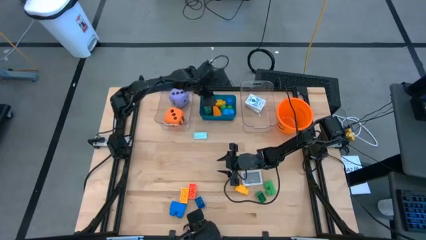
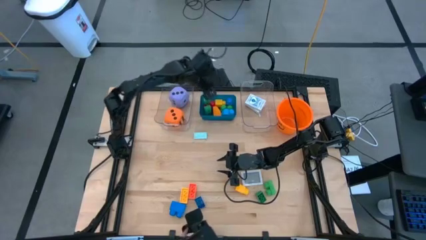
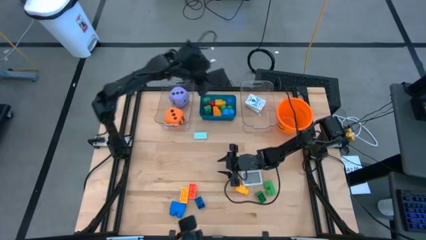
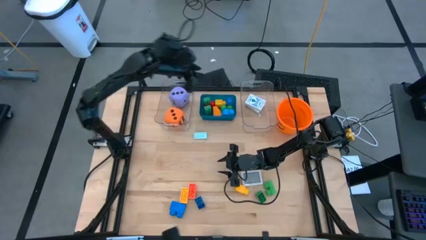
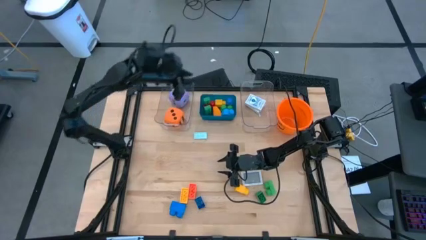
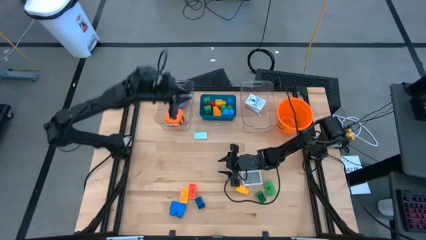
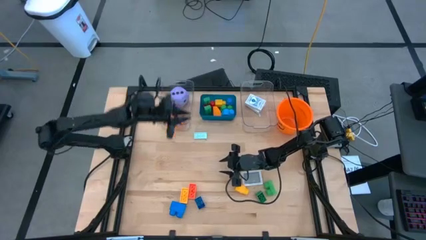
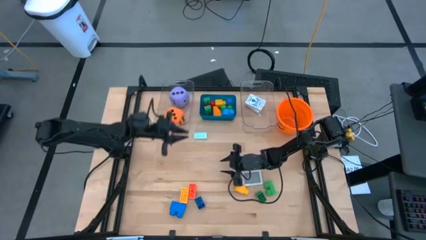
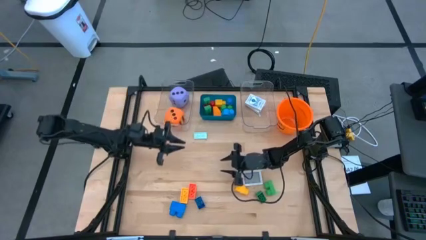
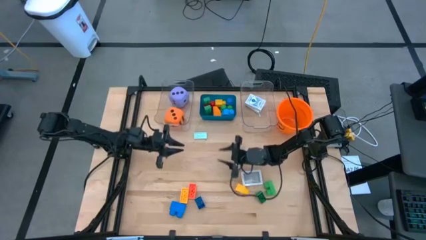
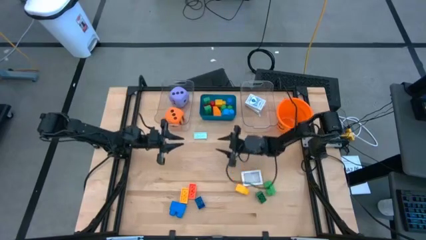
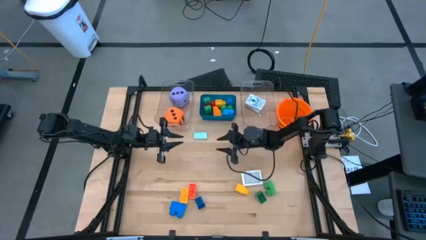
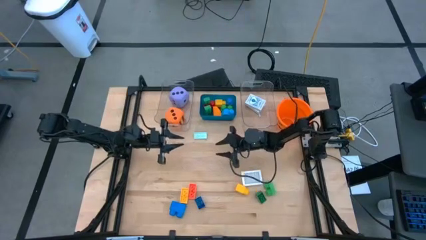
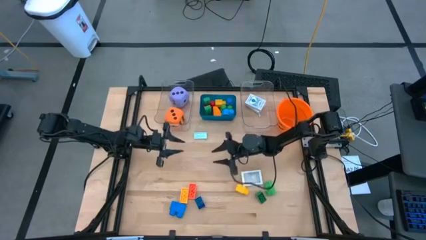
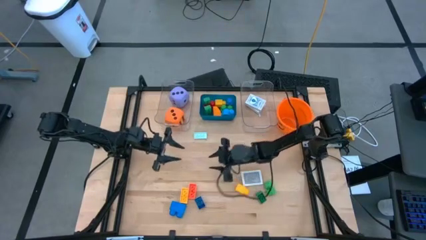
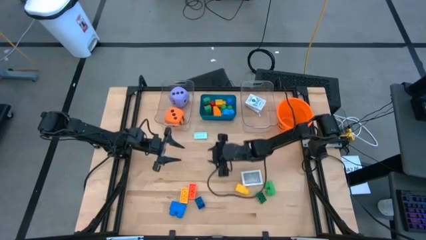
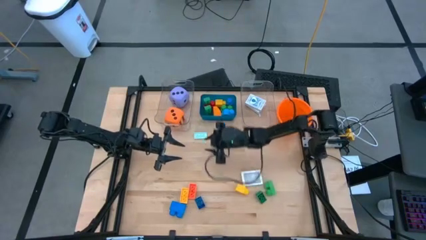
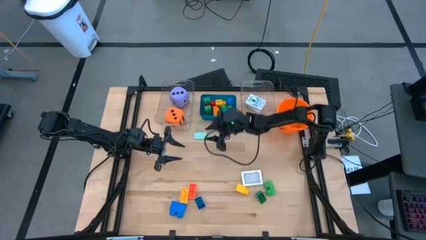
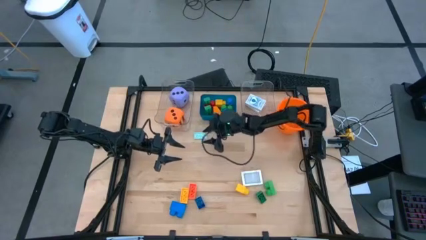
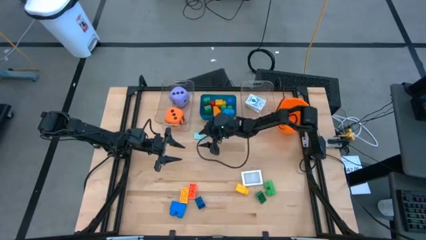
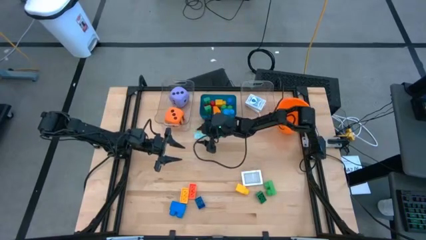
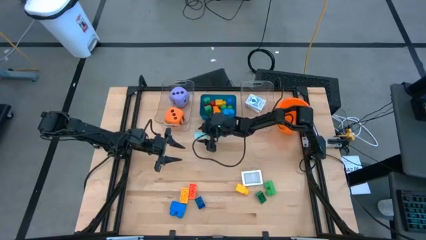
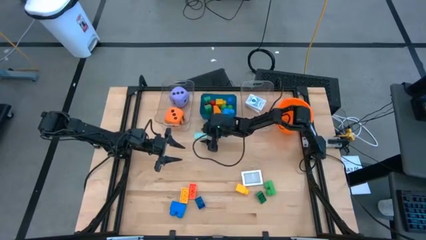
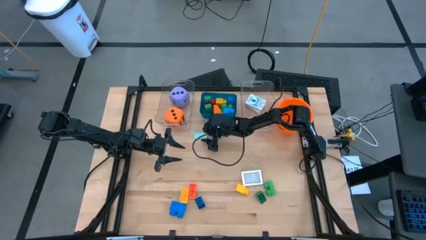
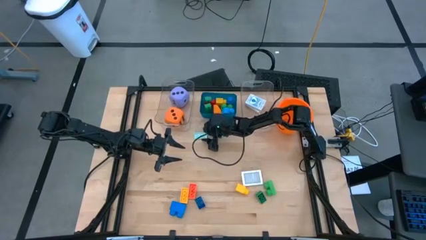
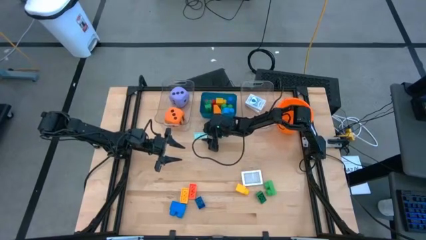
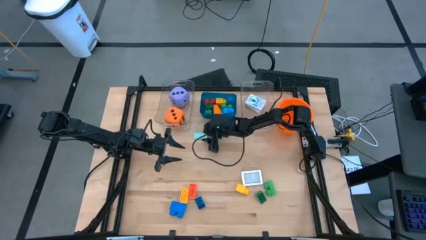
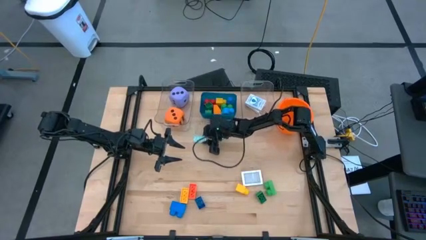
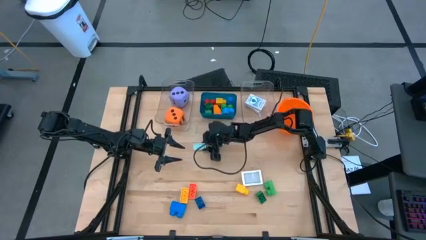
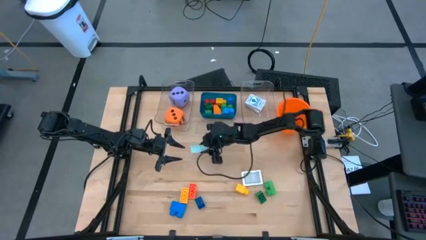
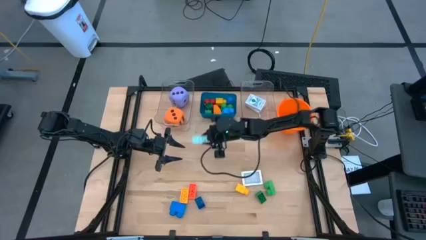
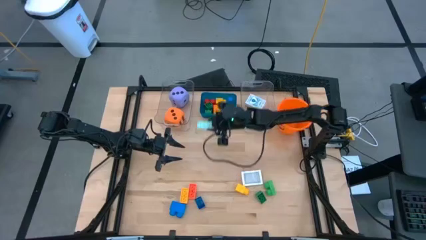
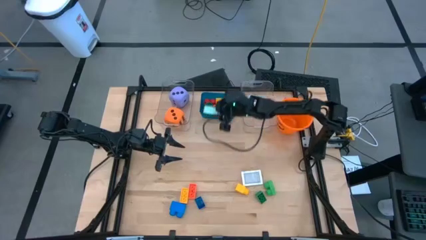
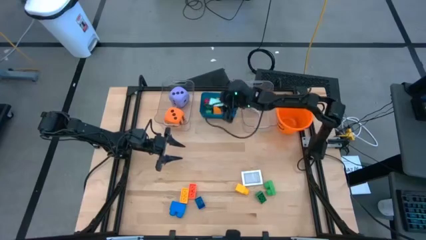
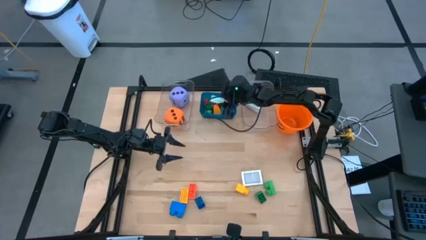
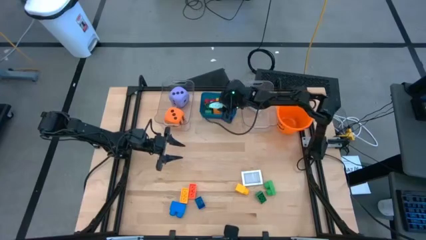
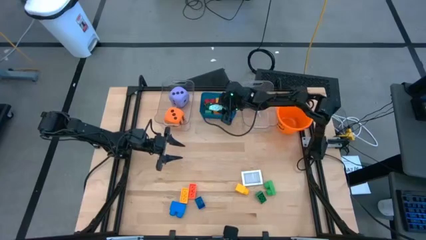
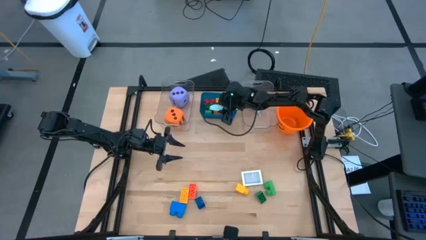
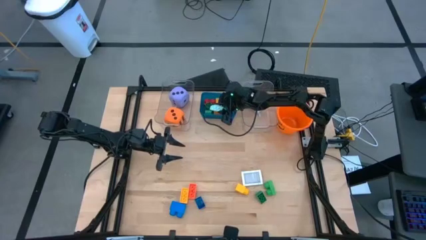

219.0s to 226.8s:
Task: Pick & Place Toys
Put the light blue game piece into the blue bin

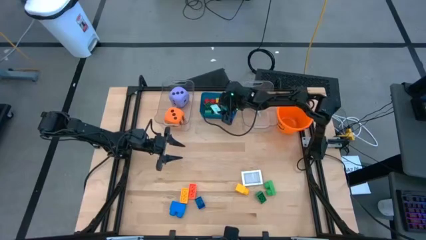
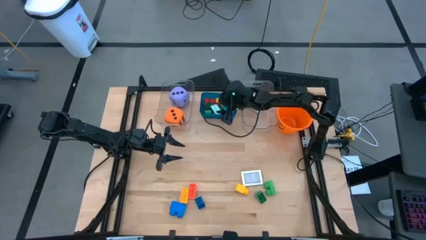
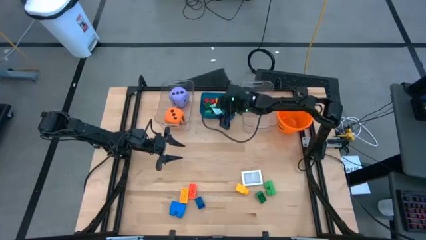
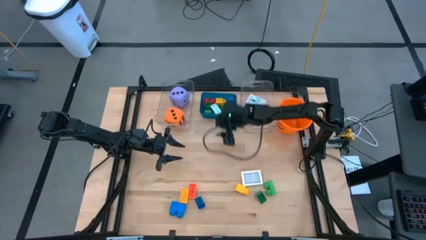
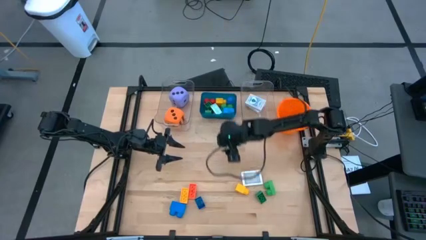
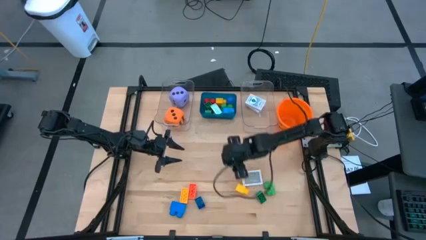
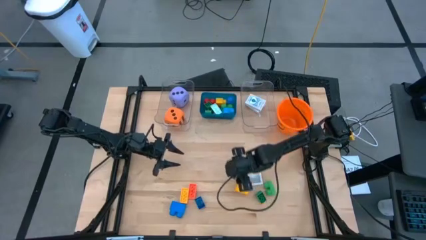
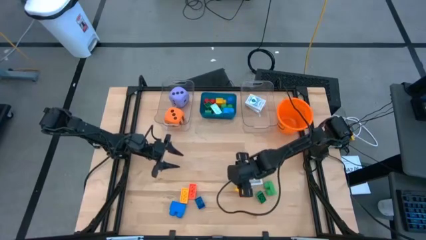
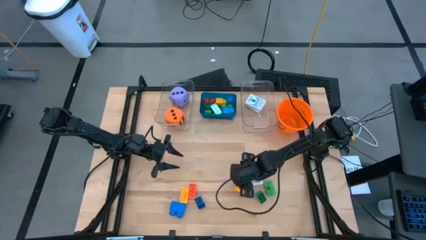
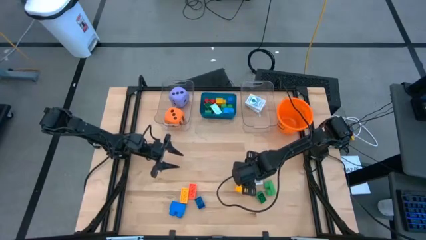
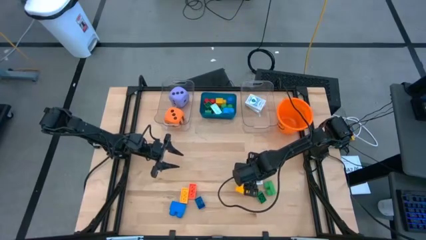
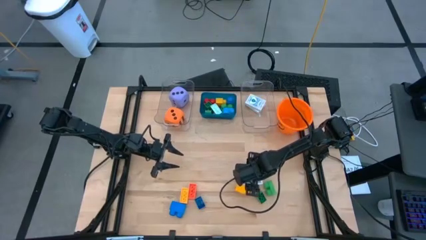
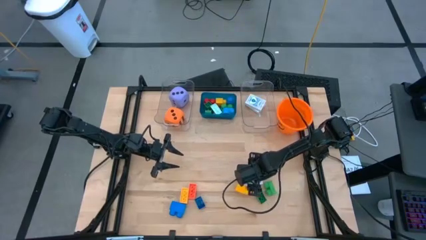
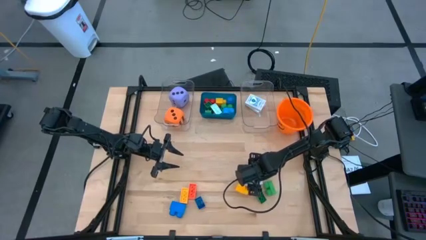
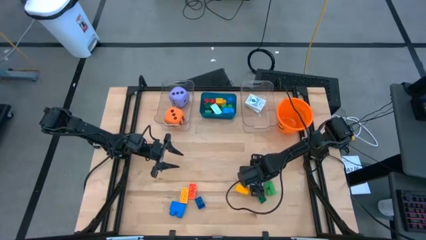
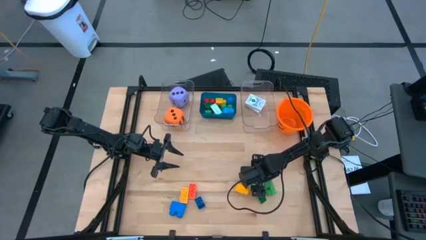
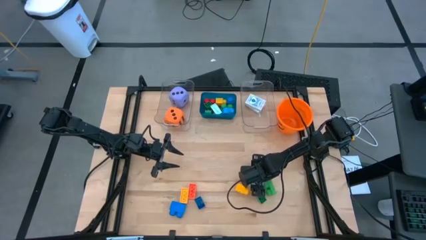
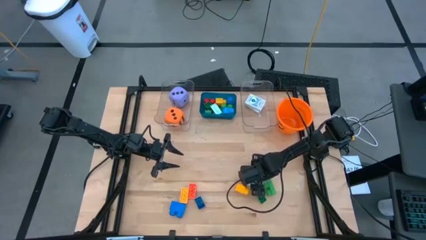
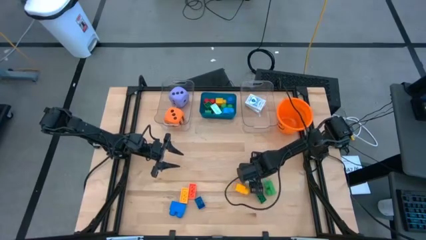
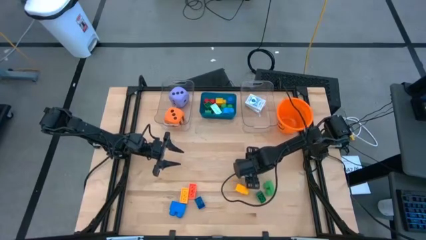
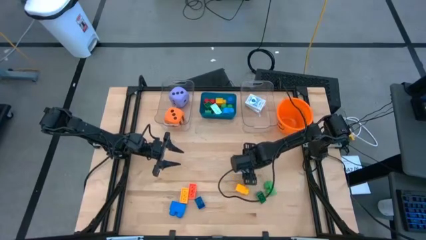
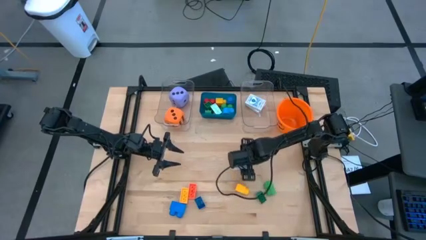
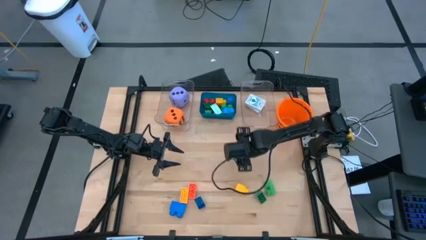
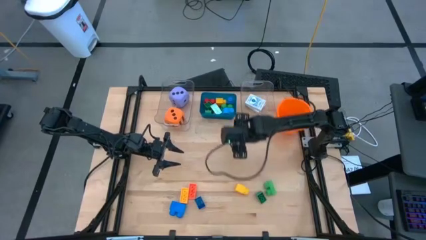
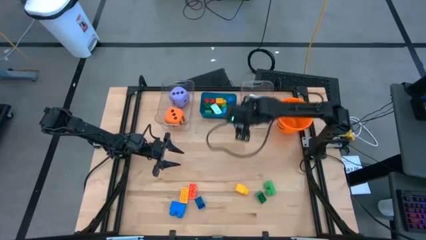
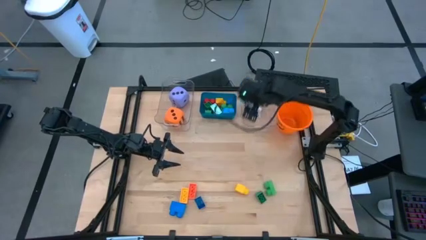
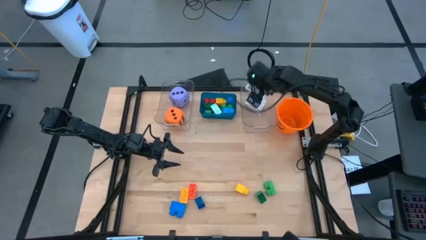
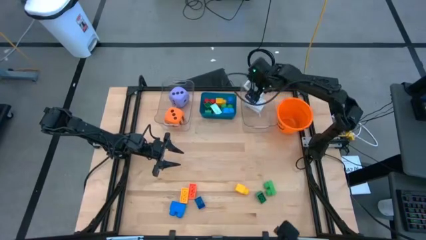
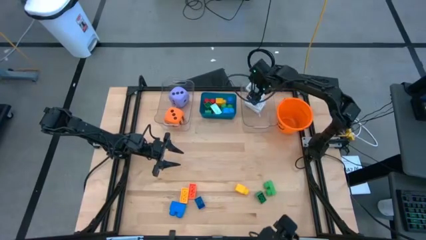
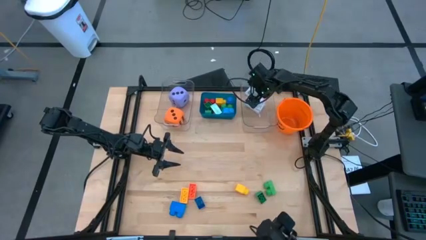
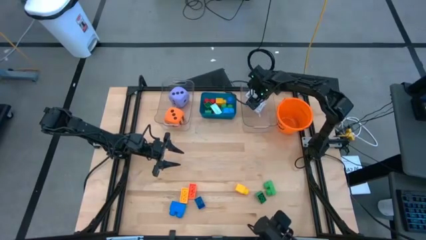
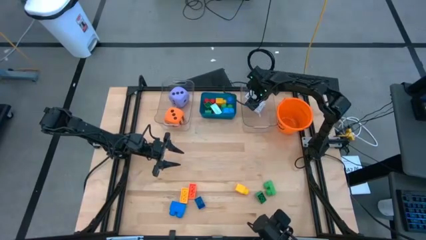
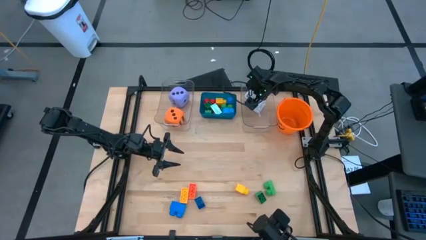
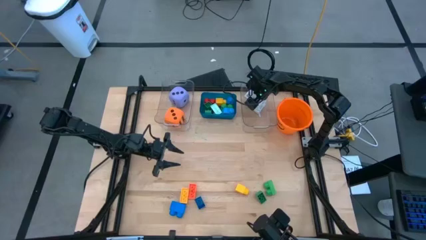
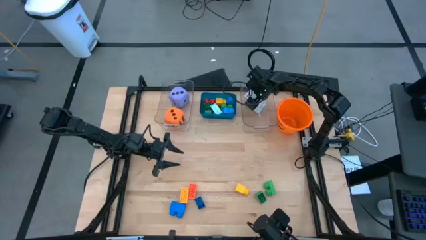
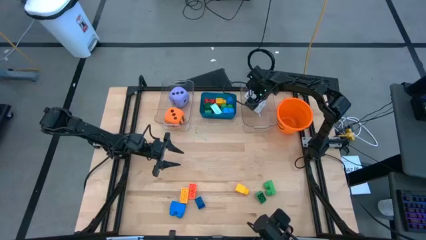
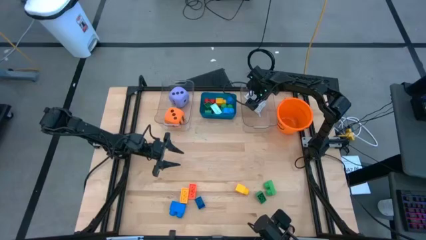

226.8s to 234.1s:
Put the black deck of cards into the right transparent bin
